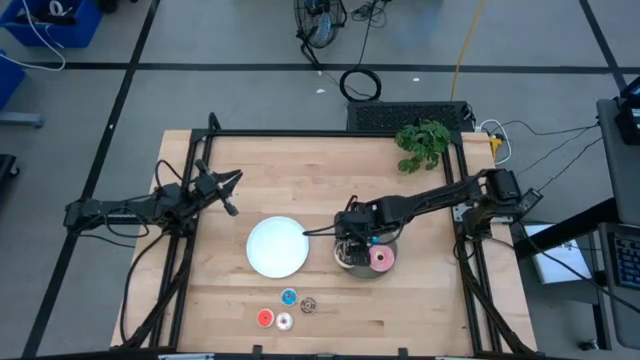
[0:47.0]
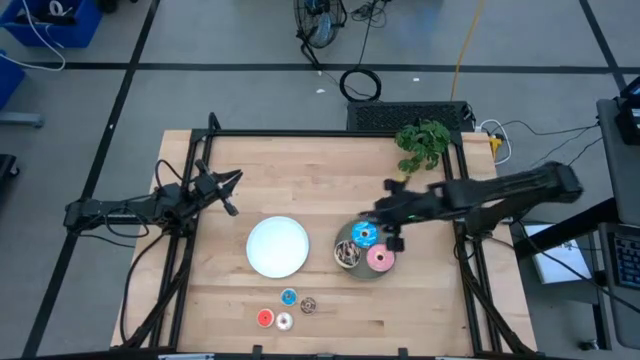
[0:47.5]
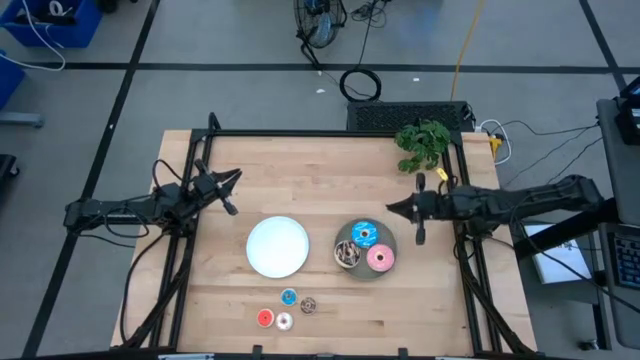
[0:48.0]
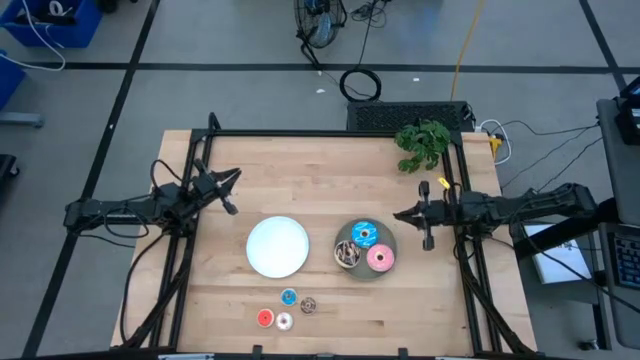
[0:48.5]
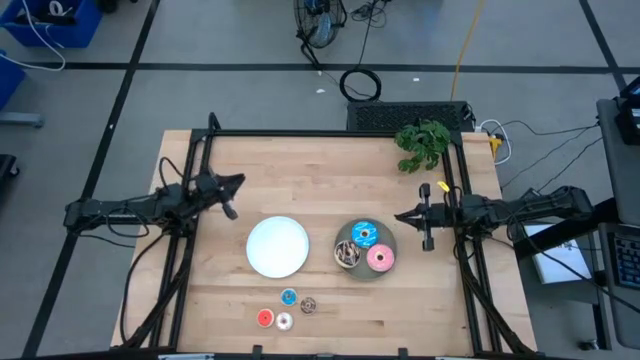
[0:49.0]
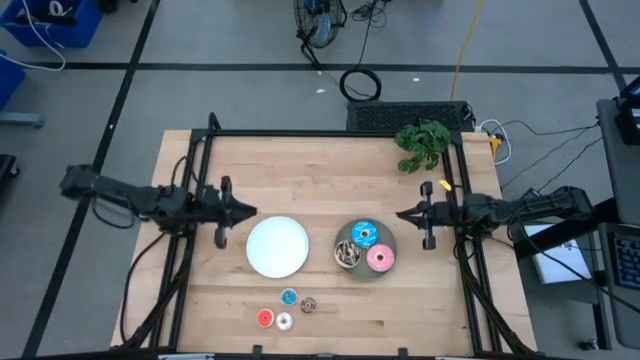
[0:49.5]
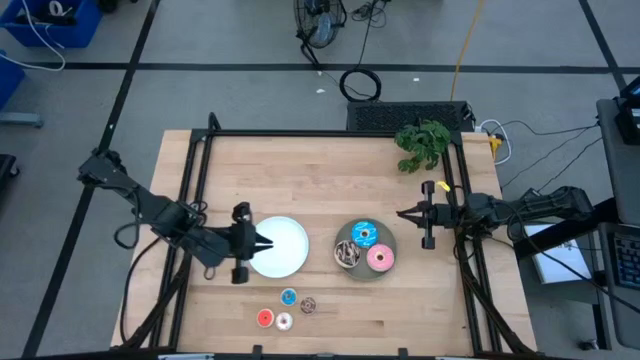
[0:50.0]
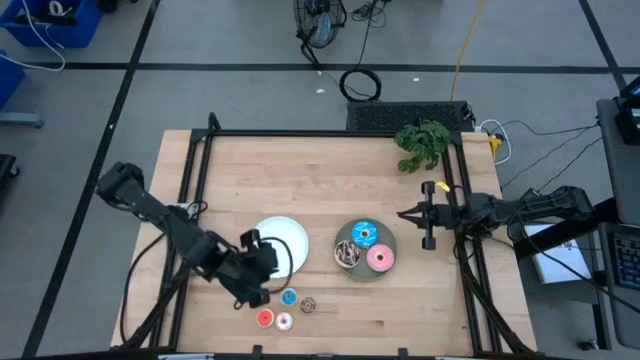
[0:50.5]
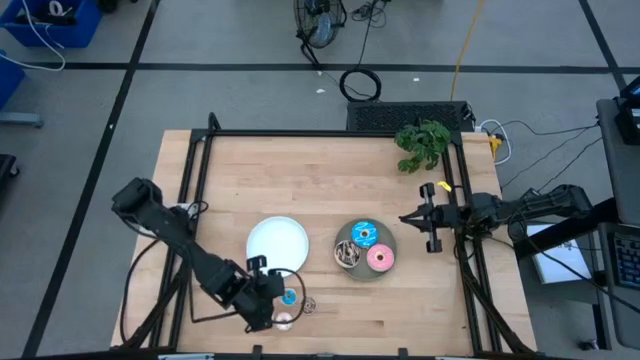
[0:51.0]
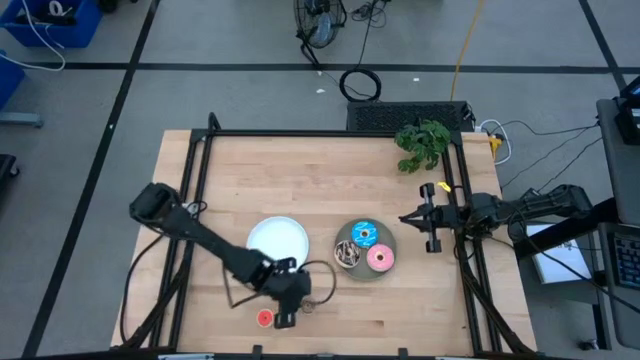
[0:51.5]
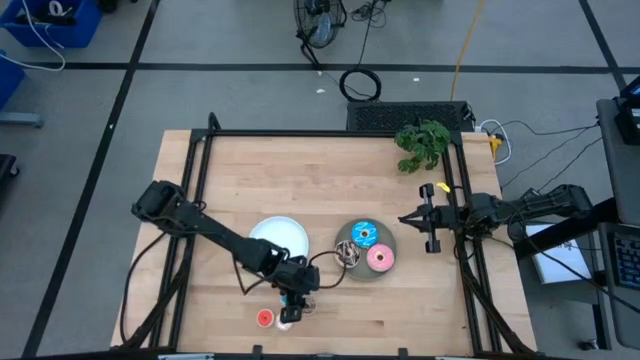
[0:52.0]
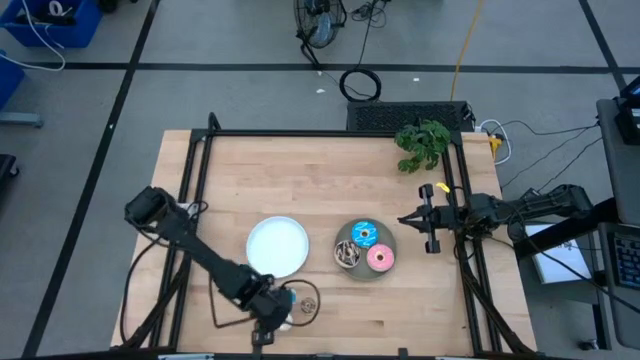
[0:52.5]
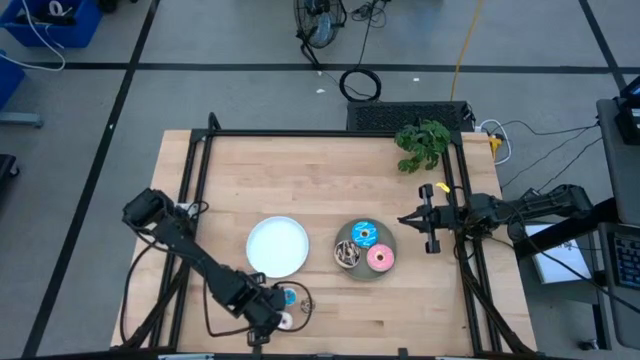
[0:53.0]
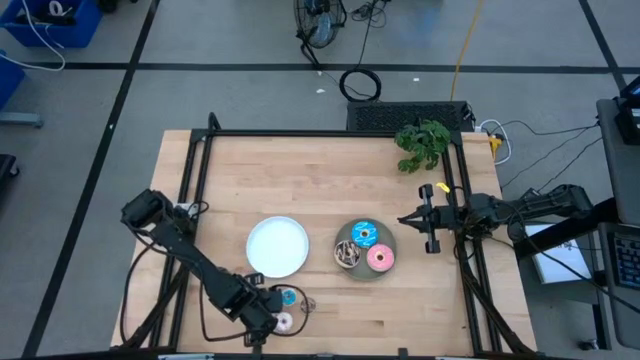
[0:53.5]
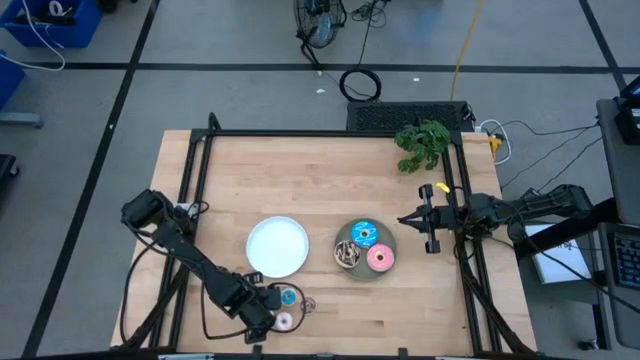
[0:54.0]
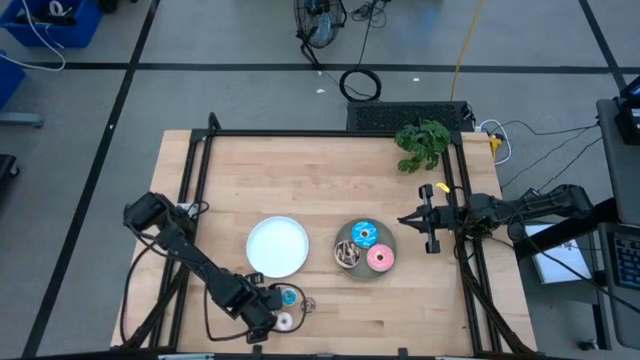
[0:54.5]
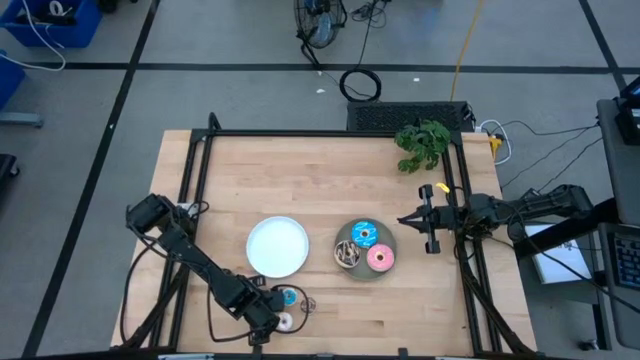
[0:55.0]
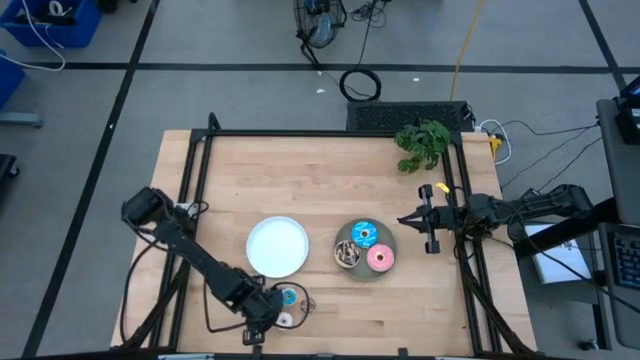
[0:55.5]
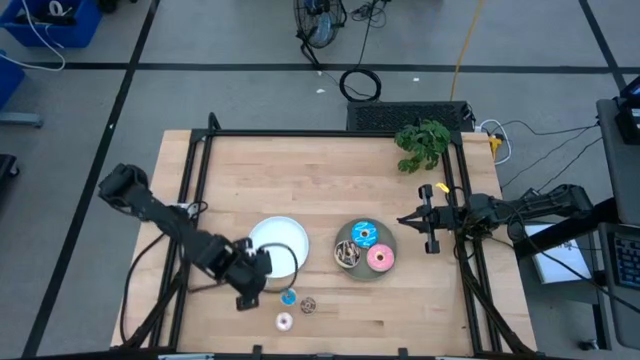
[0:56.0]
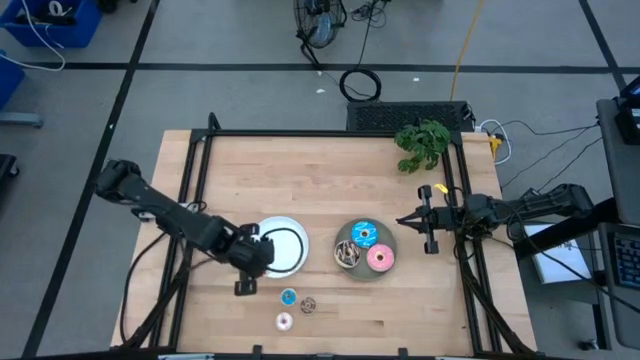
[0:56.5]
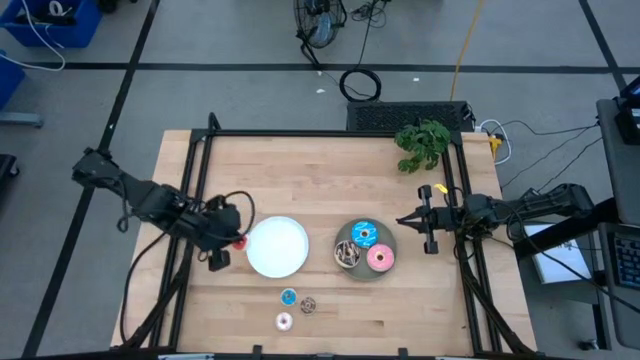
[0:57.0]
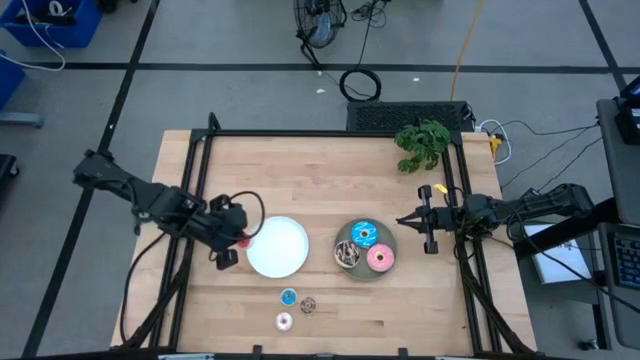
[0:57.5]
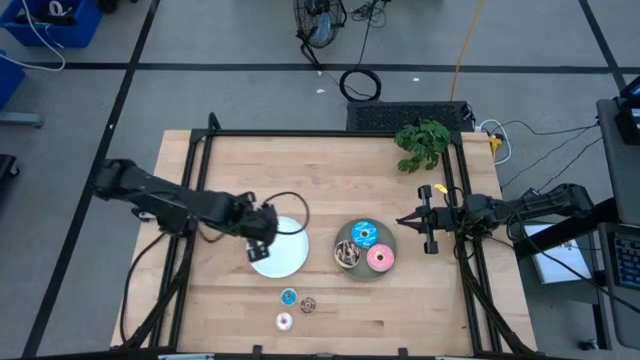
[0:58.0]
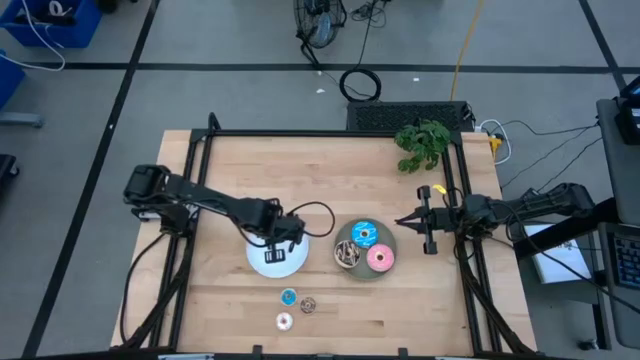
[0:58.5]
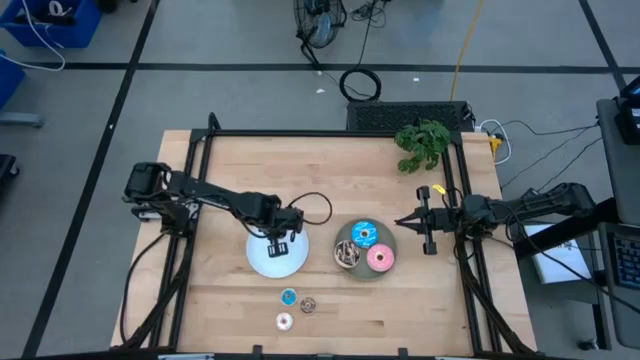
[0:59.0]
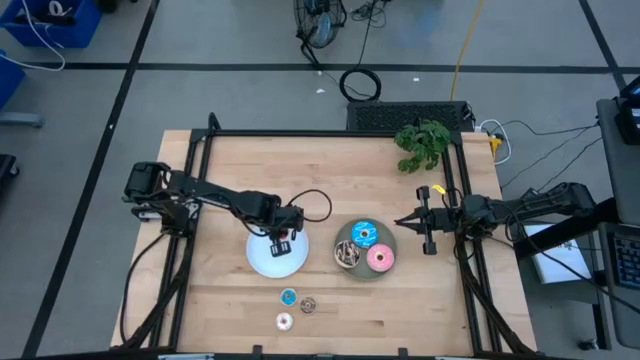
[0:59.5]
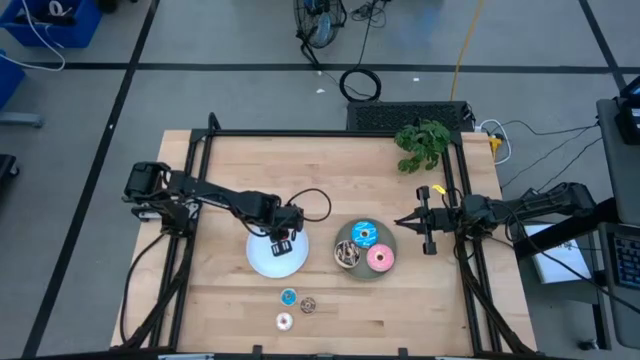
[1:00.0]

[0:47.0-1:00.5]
Task: Pick & Place donuts
Put the small orange donut on the white plate

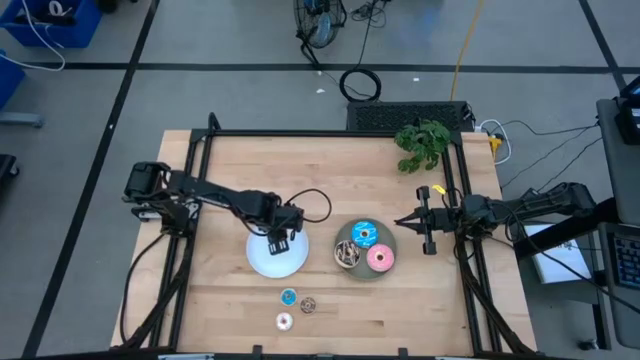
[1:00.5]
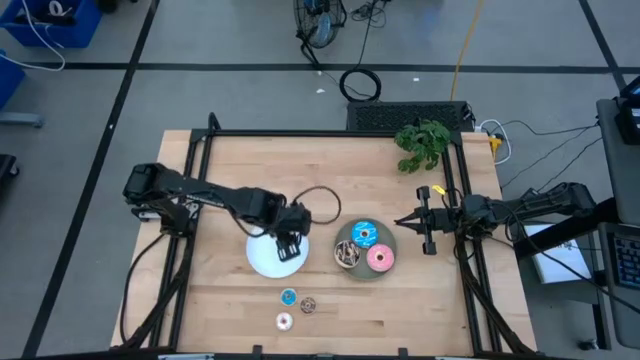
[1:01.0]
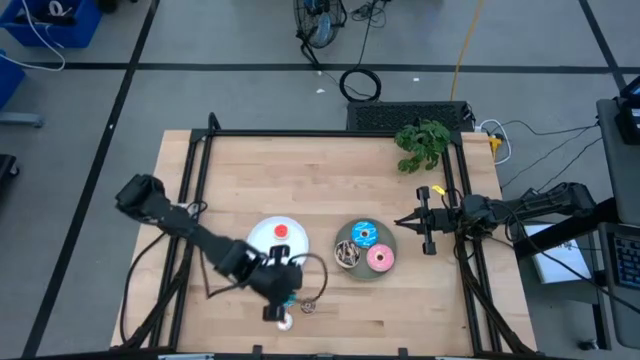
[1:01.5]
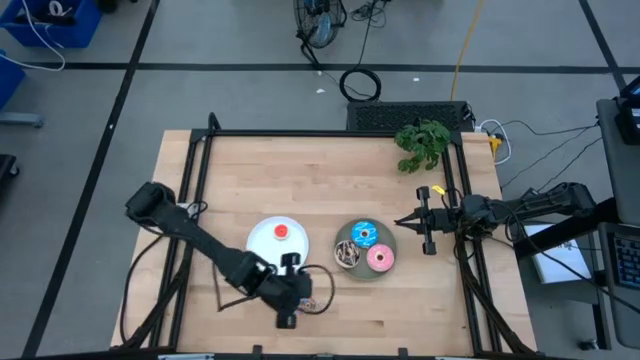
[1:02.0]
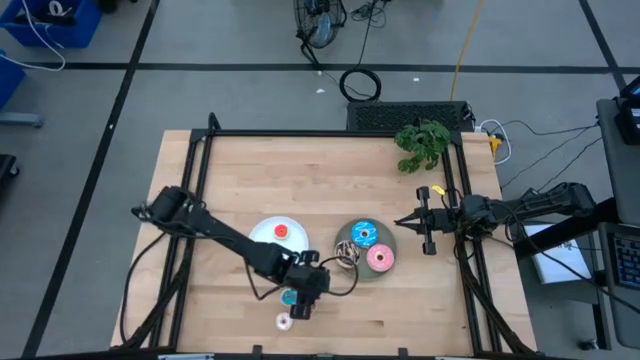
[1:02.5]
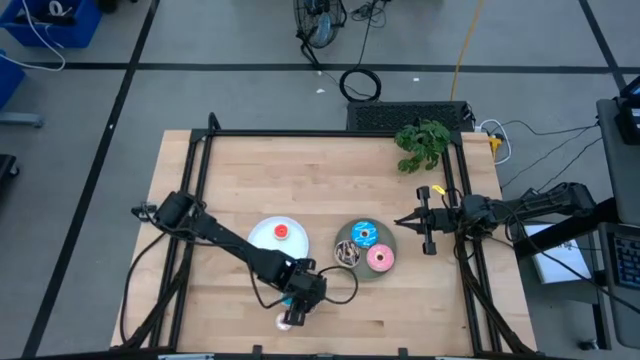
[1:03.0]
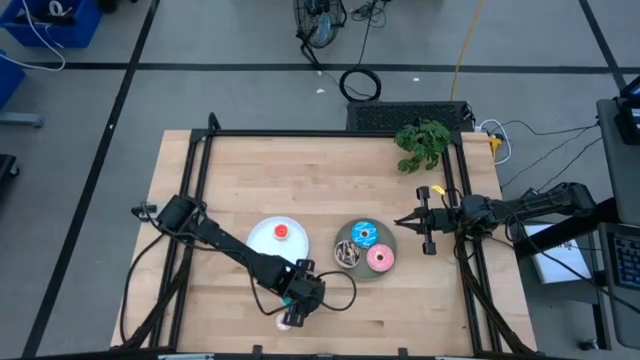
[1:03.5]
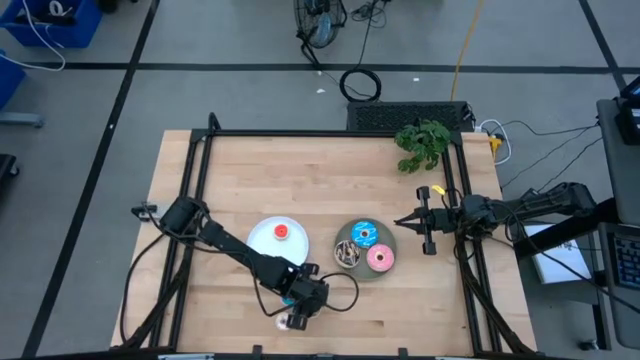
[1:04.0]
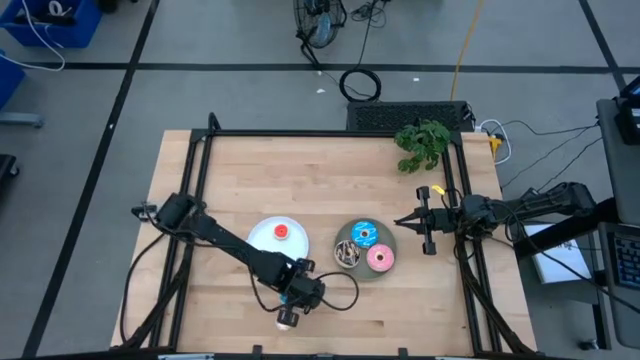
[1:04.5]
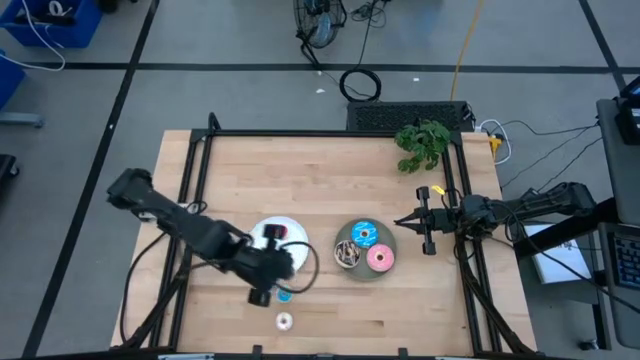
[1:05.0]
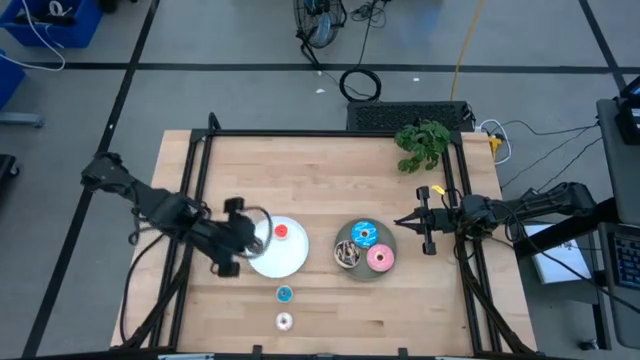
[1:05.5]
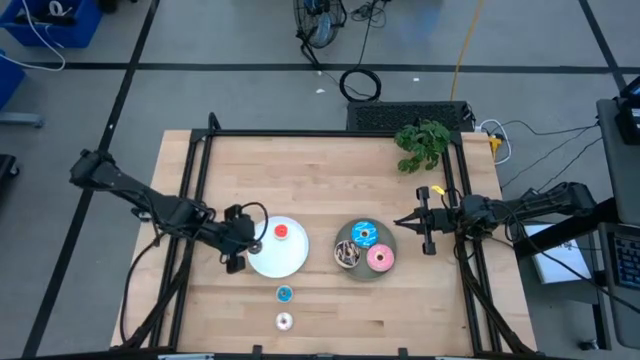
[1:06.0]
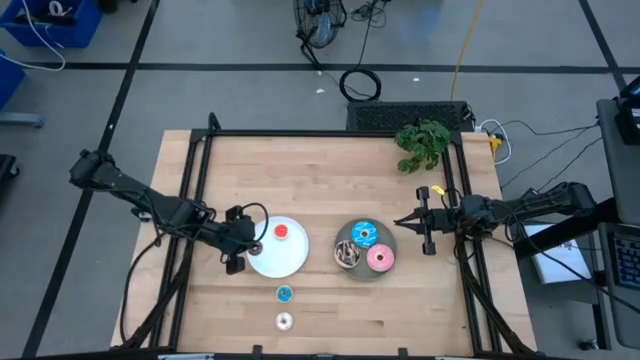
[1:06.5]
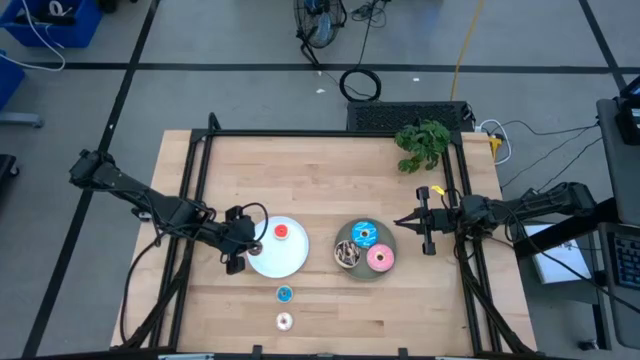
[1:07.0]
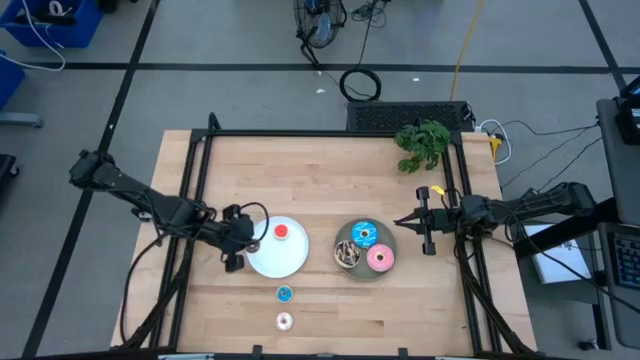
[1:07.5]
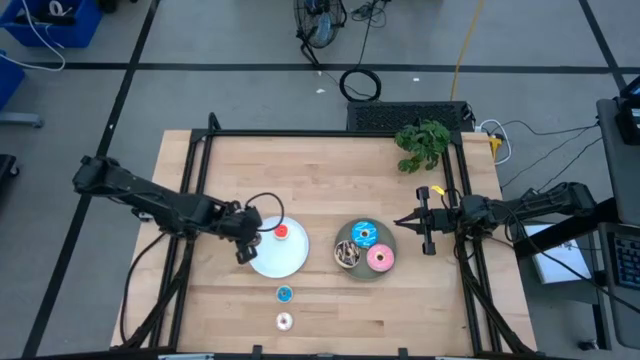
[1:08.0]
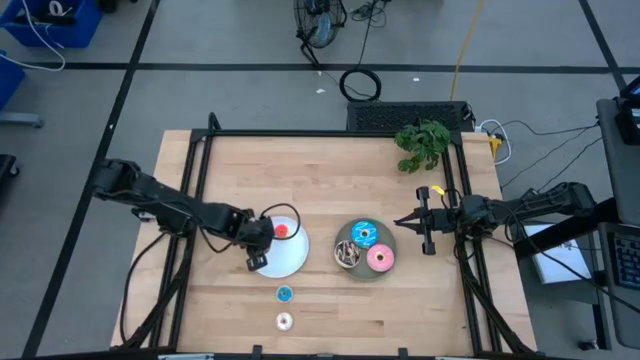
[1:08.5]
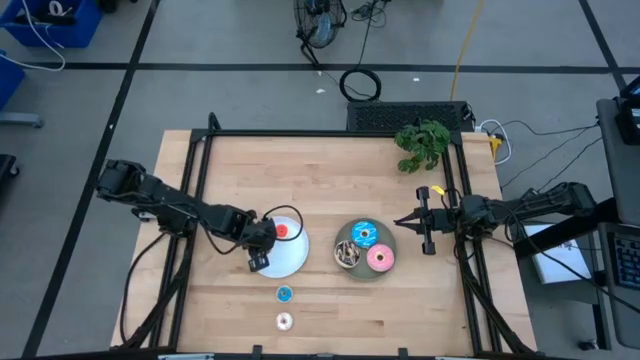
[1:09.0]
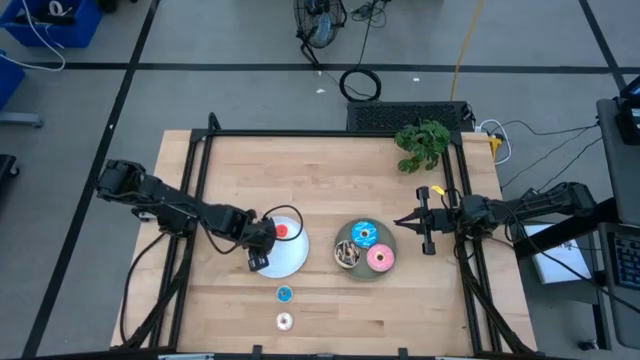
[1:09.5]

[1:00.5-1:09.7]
Put the small brown donut on the white plate
